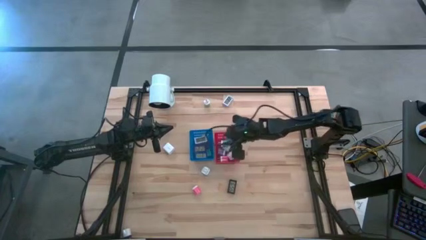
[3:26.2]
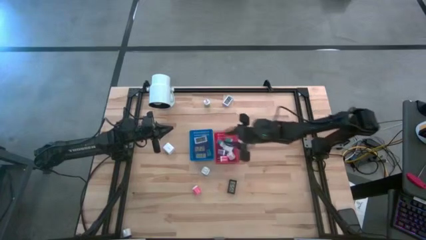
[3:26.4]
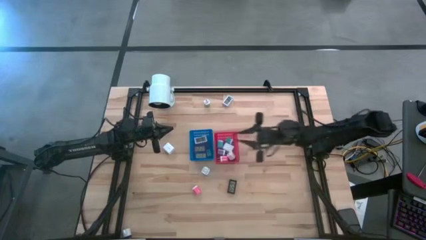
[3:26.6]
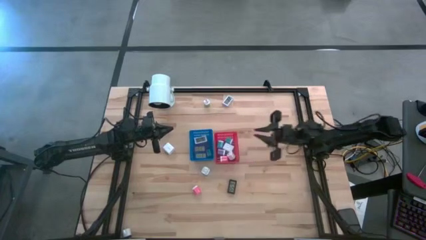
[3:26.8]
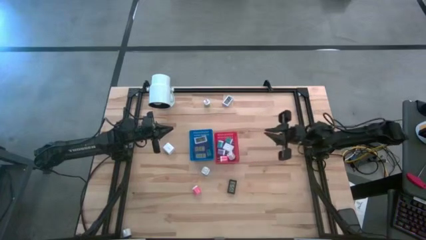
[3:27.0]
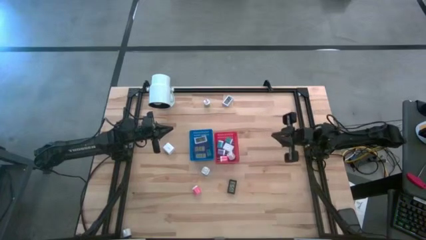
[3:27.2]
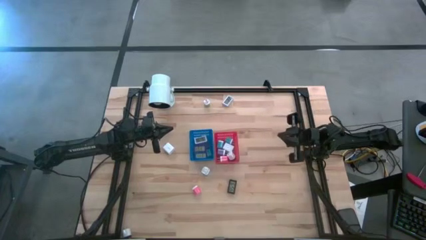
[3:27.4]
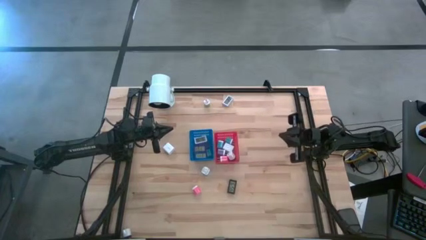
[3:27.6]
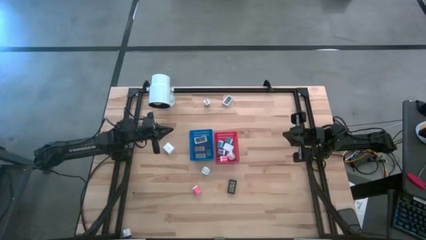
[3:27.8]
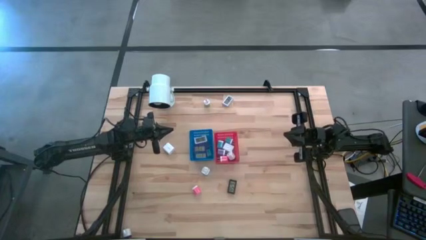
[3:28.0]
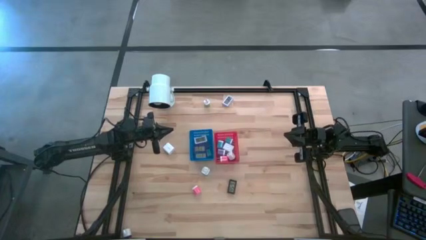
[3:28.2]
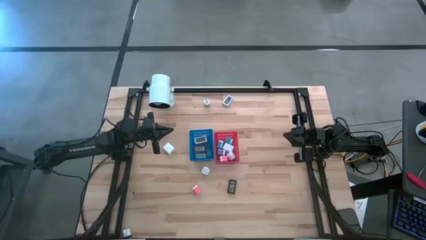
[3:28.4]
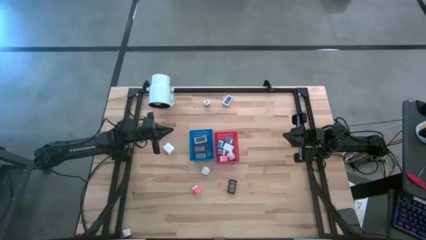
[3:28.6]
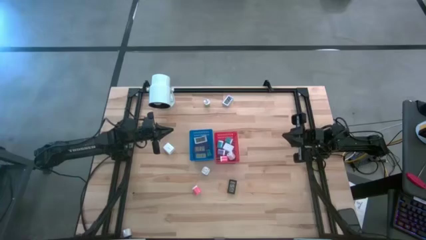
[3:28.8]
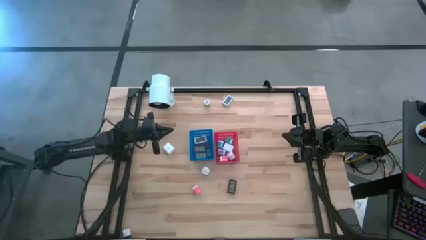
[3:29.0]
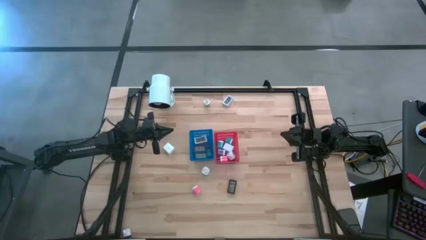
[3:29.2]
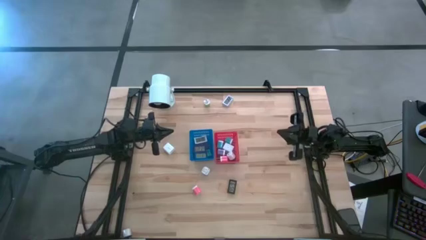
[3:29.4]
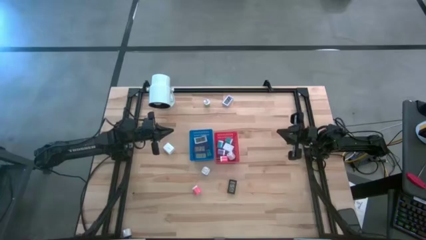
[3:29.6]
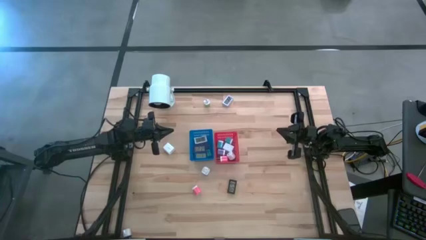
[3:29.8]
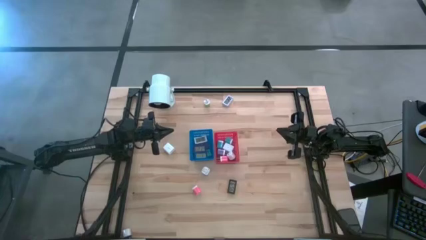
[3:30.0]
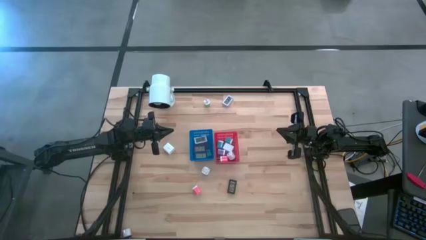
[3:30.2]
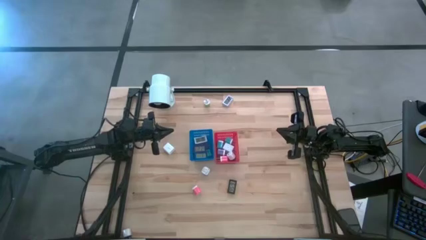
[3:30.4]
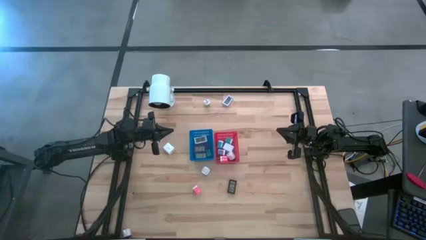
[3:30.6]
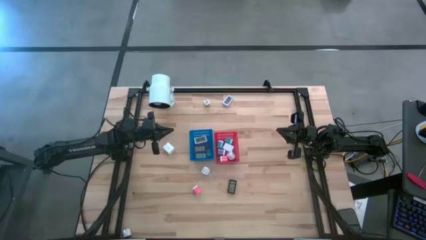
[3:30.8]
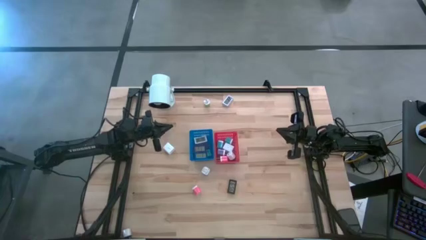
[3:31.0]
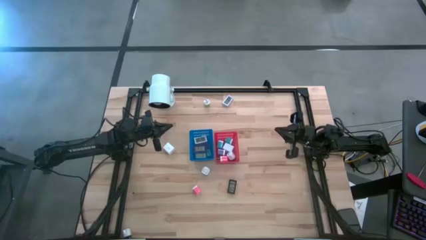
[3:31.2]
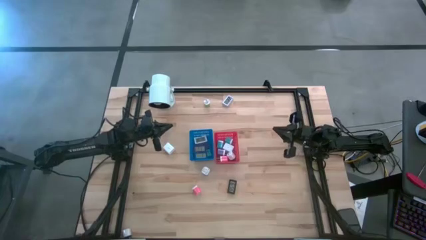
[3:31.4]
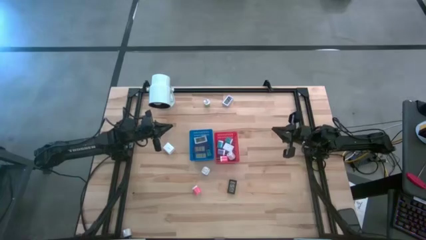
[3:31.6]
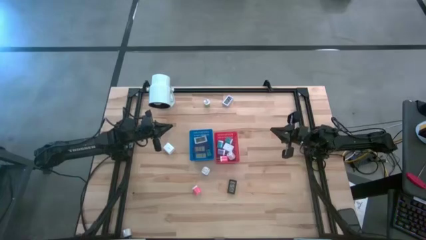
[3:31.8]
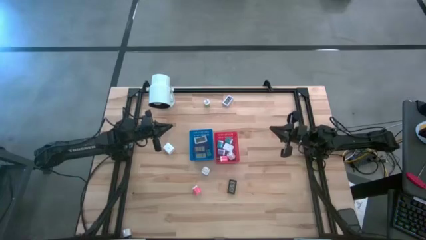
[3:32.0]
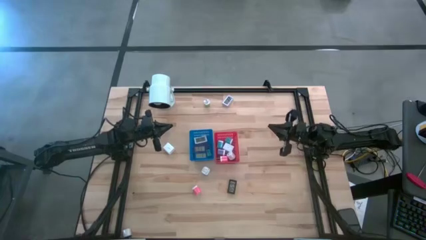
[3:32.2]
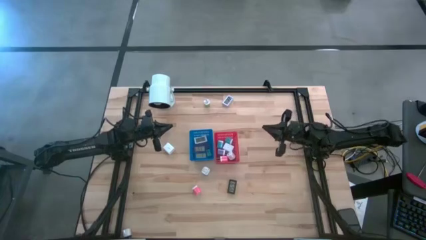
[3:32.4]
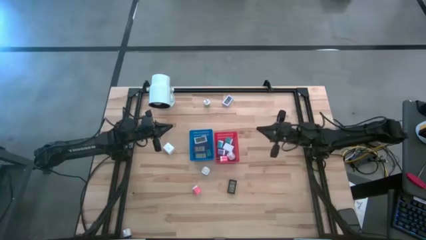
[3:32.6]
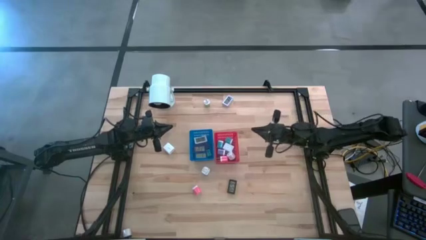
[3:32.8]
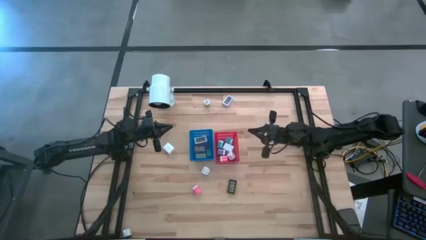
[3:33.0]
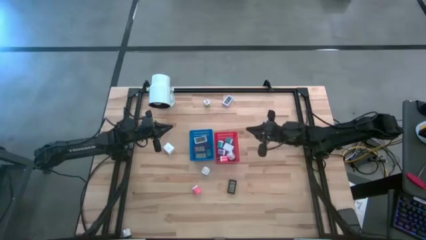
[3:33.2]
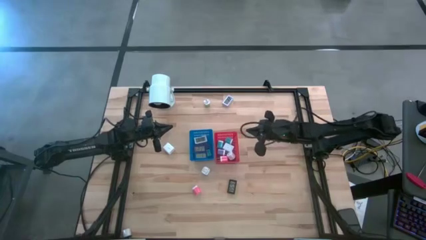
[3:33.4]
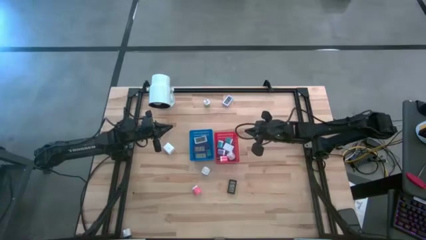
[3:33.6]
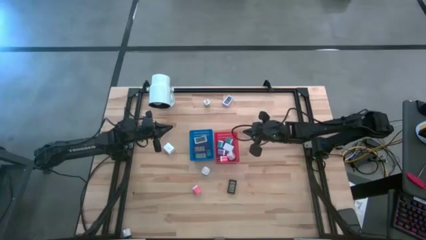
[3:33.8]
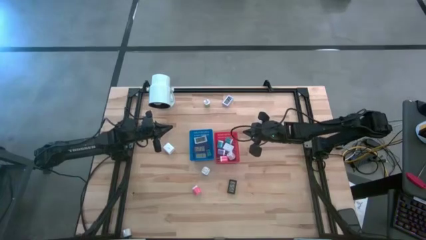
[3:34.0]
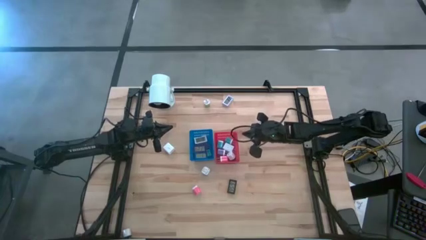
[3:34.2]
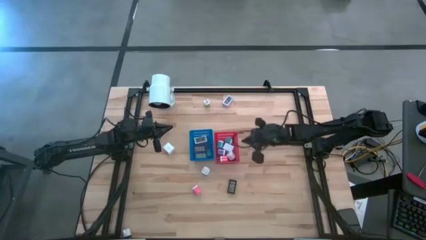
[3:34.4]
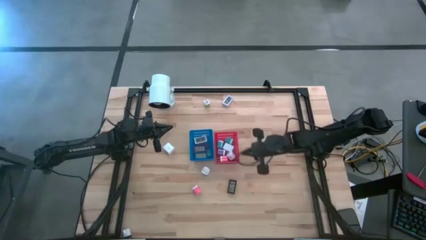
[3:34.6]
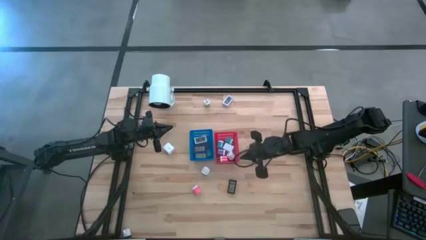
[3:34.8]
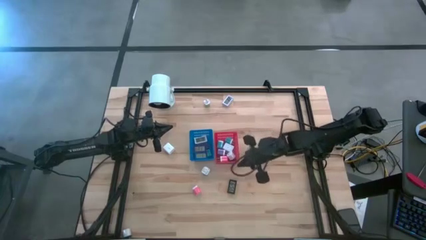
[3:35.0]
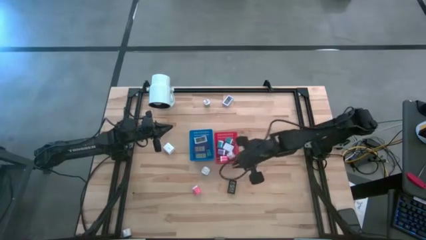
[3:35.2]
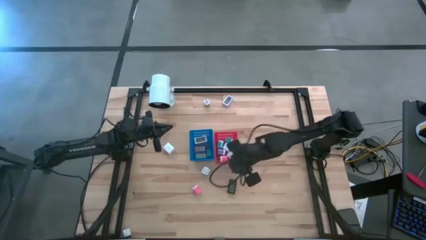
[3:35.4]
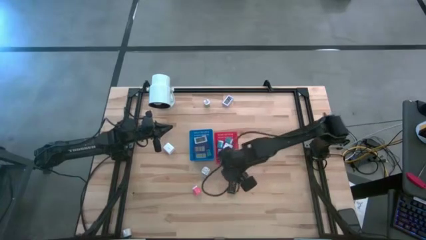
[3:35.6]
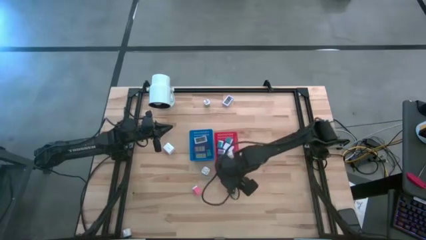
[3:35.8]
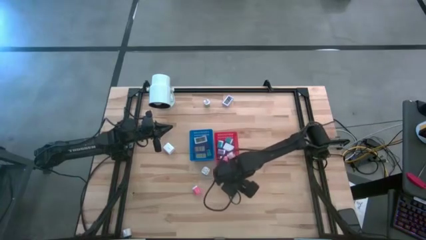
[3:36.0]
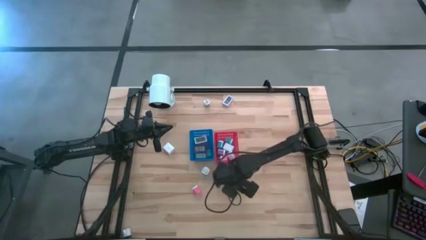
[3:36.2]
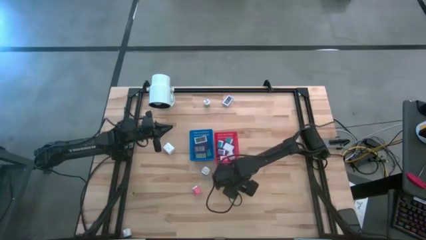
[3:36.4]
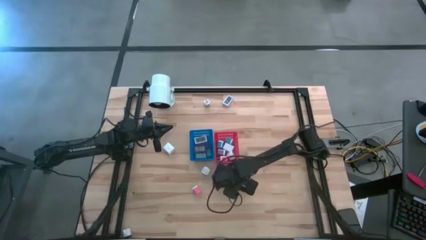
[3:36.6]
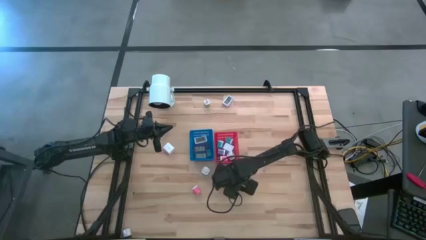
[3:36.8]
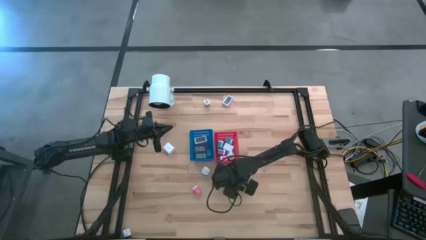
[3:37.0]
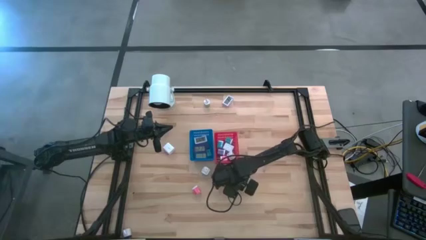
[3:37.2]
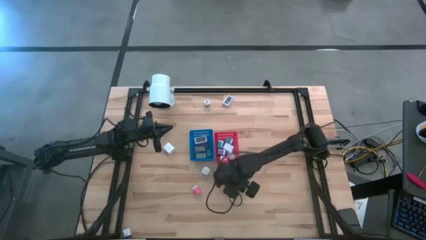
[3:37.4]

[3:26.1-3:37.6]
Task: Pick & Place Office items
Put the black digital clock into the blue bin

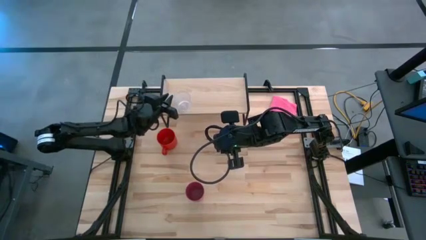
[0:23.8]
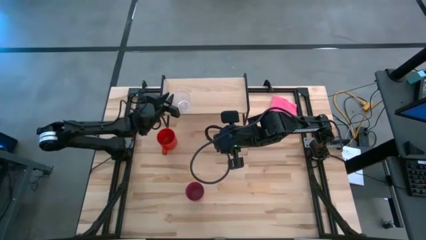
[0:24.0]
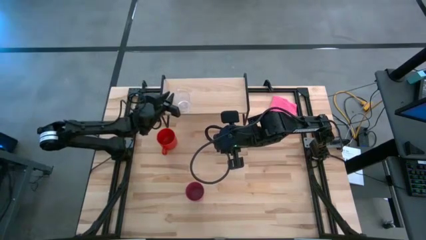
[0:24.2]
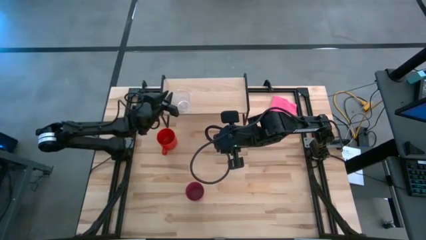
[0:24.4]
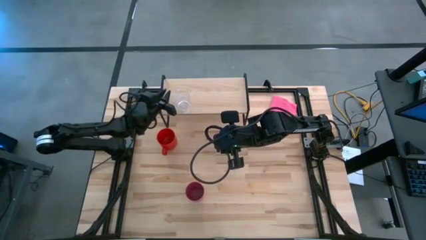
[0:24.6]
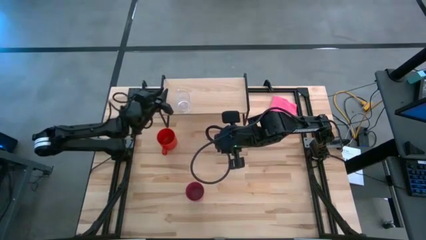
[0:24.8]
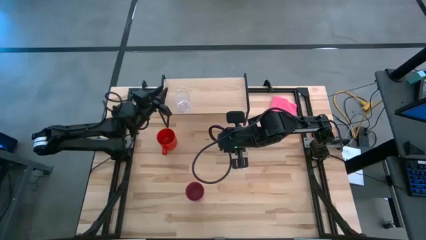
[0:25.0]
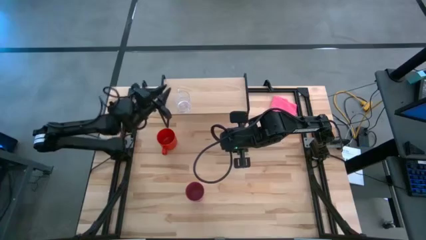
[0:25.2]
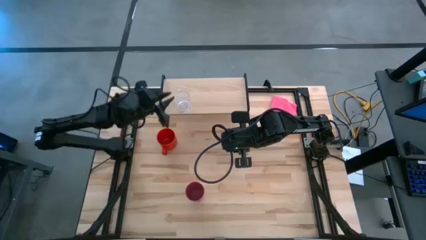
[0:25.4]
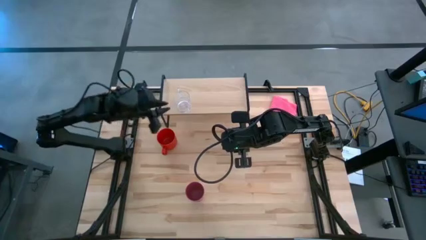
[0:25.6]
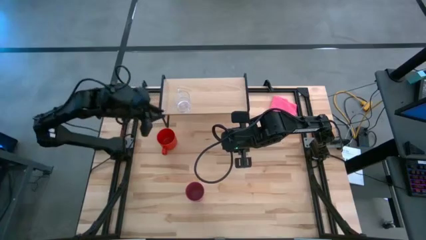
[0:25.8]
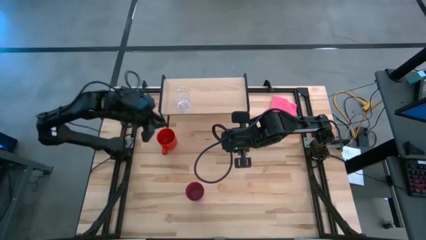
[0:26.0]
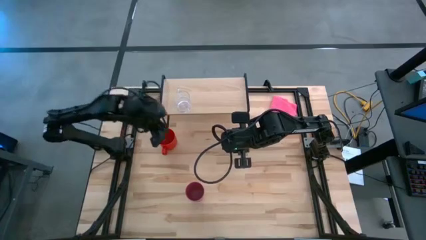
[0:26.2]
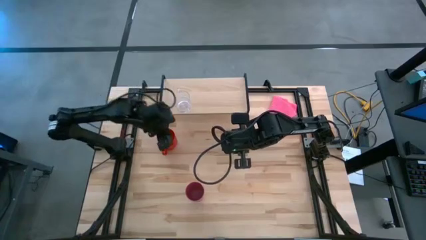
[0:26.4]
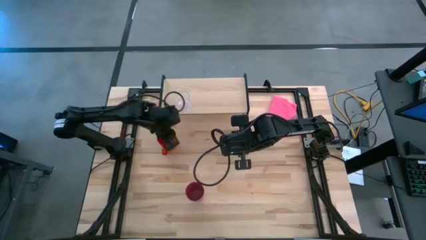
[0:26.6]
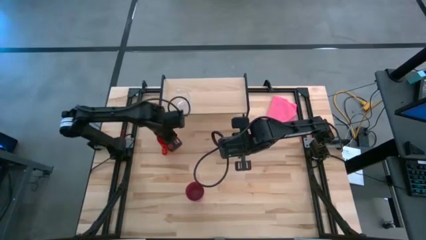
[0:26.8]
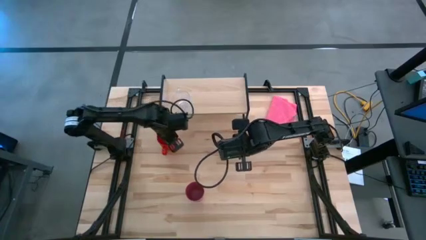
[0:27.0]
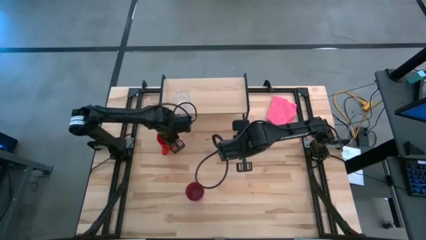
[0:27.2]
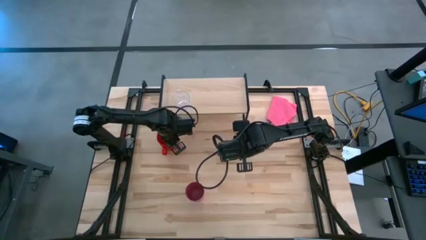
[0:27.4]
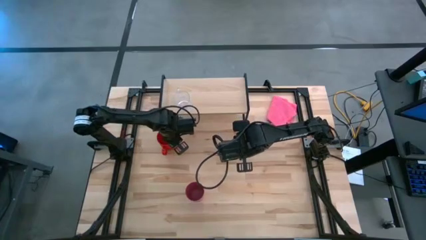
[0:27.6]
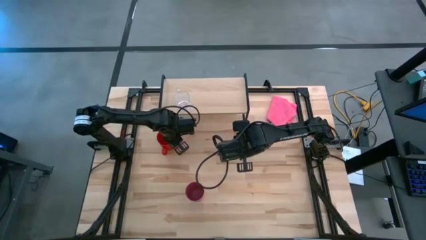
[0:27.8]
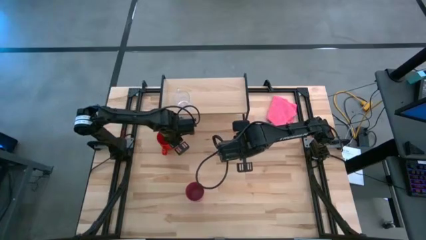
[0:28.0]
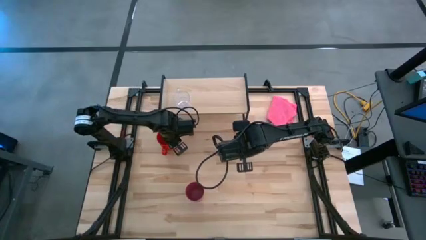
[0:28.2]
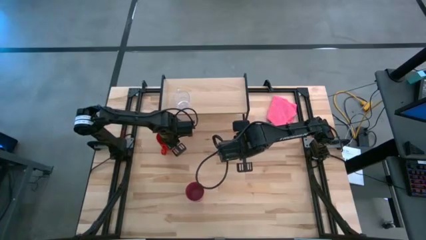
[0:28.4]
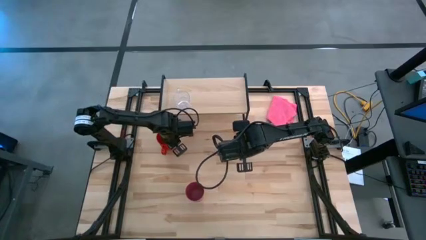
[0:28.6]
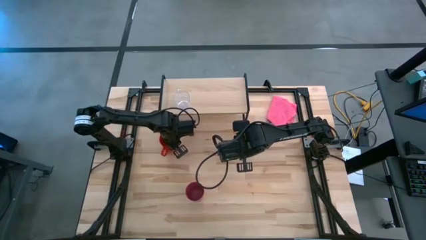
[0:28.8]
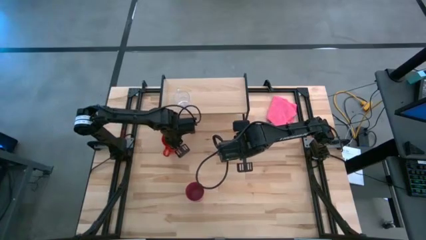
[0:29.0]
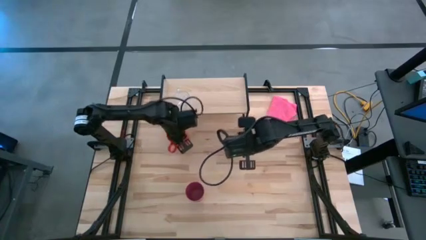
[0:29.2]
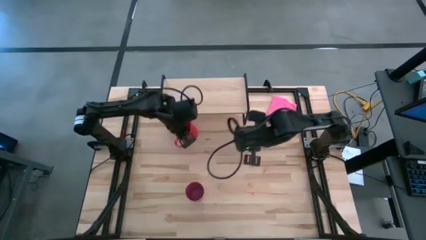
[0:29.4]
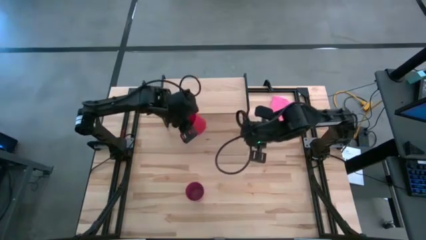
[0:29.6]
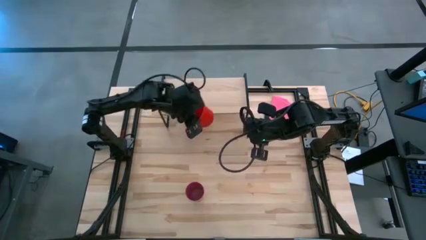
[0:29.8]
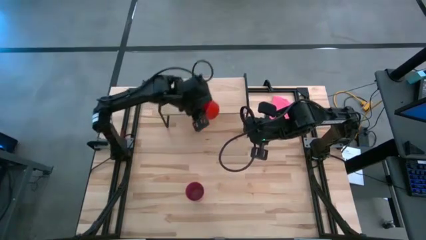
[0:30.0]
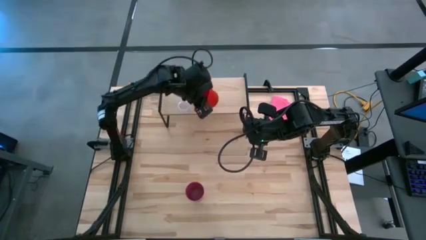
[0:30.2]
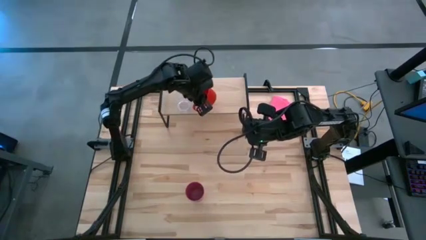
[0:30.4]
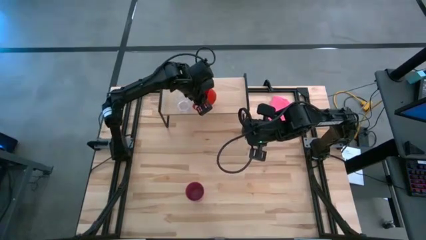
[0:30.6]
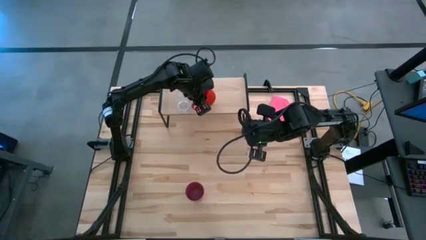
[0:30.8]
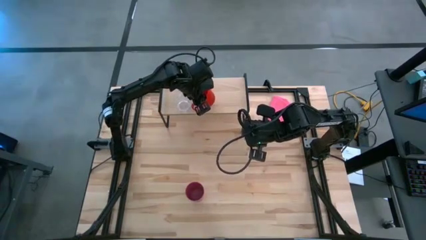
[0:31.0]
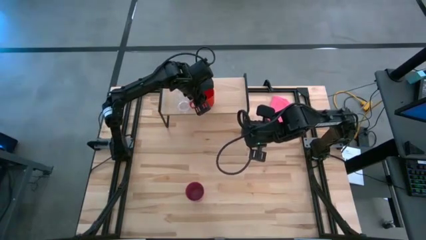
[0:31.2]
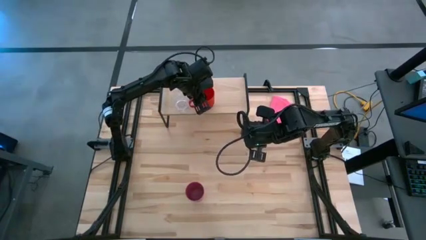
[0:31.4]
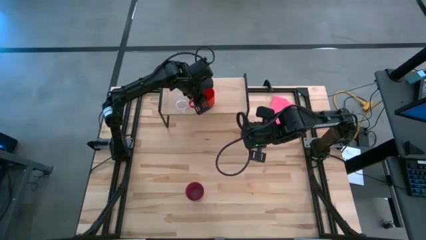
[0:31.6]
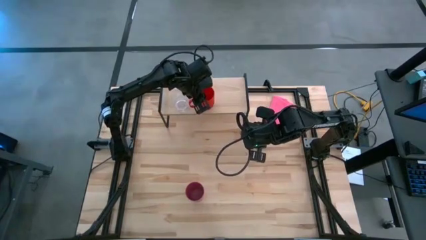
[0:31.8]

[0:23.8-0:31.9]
Task: Stack small to large cups/mugs on shelf
Put the red mug on the shelf
